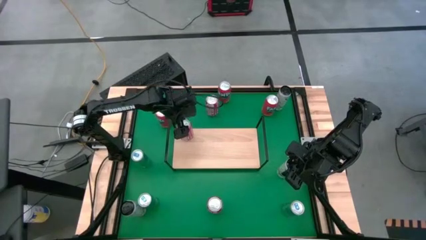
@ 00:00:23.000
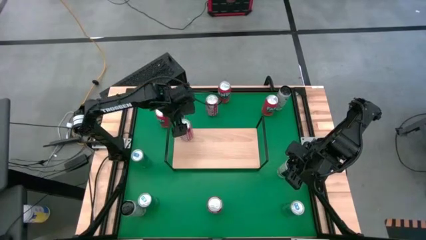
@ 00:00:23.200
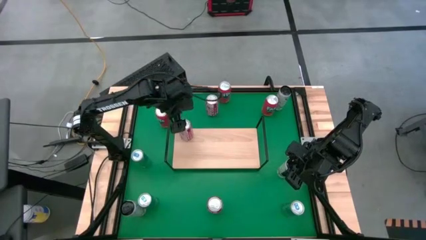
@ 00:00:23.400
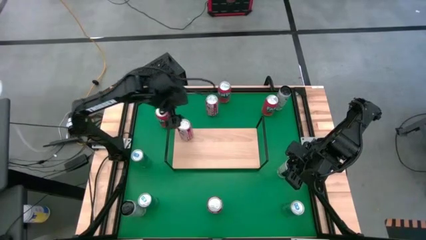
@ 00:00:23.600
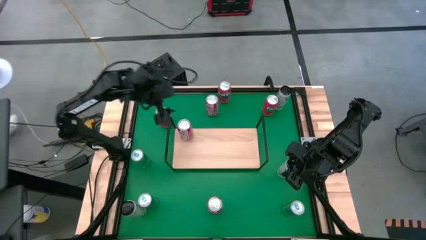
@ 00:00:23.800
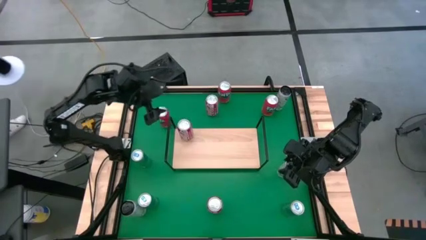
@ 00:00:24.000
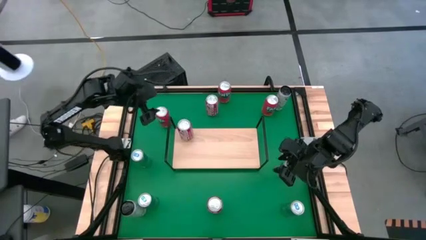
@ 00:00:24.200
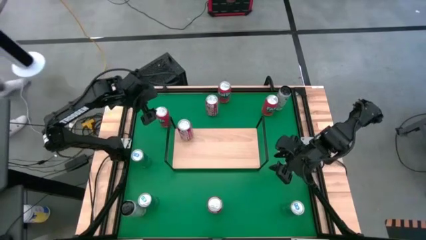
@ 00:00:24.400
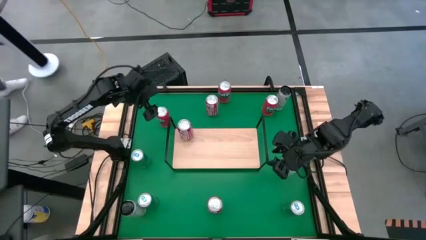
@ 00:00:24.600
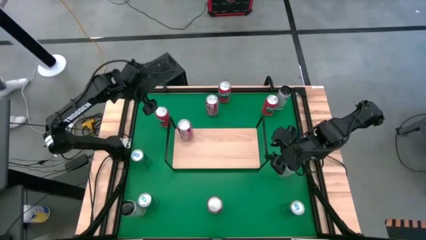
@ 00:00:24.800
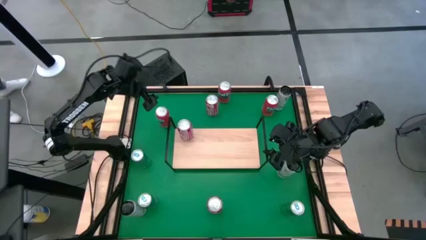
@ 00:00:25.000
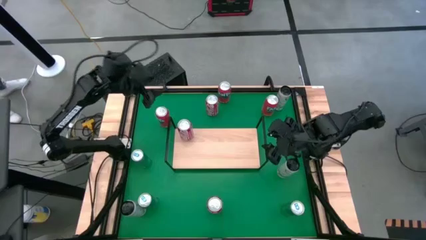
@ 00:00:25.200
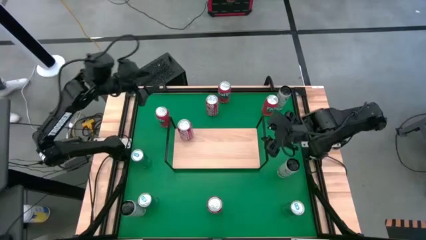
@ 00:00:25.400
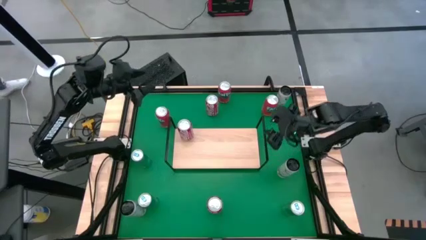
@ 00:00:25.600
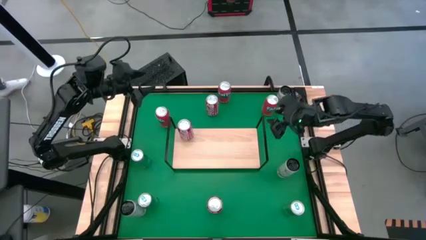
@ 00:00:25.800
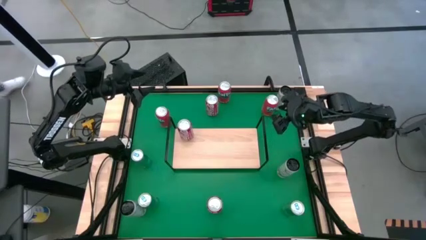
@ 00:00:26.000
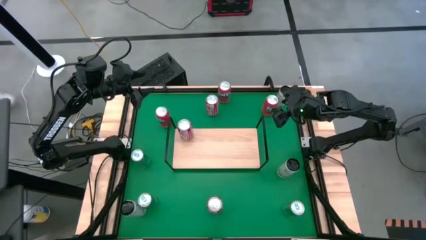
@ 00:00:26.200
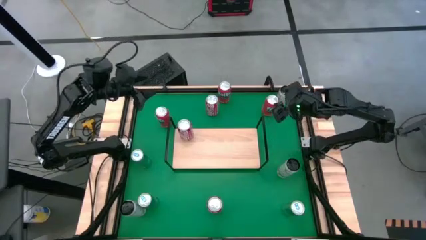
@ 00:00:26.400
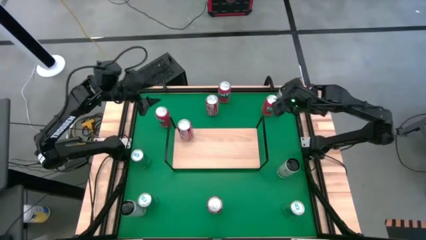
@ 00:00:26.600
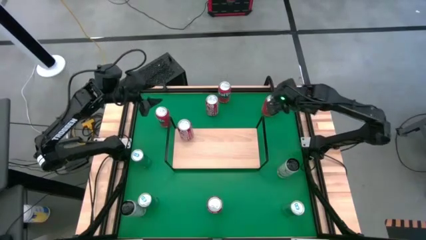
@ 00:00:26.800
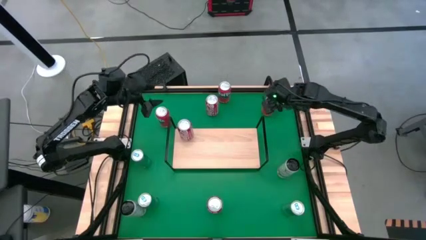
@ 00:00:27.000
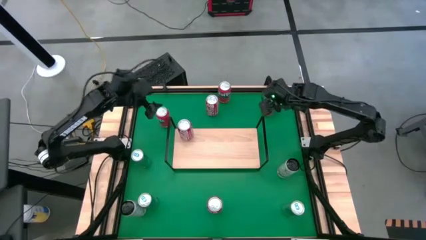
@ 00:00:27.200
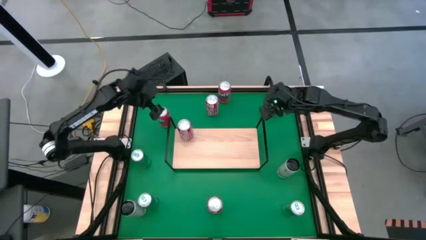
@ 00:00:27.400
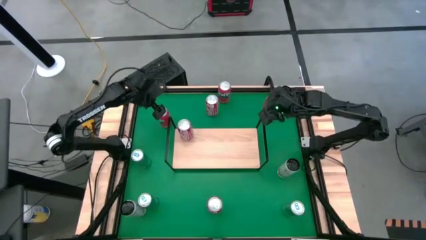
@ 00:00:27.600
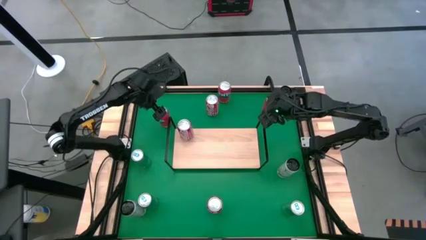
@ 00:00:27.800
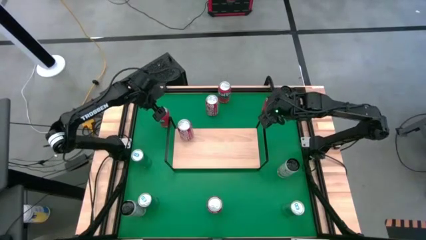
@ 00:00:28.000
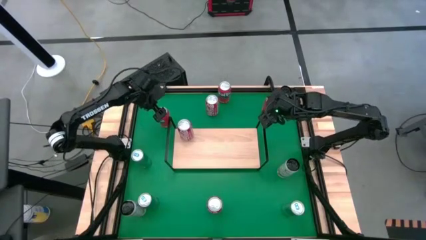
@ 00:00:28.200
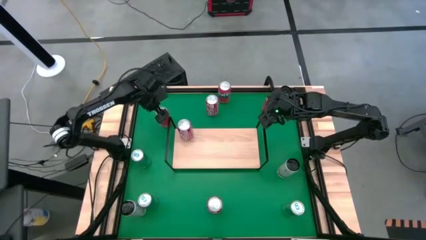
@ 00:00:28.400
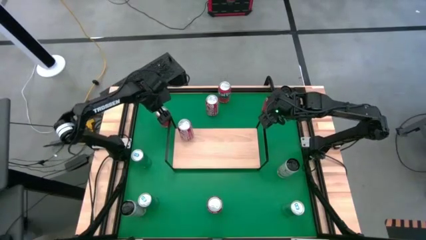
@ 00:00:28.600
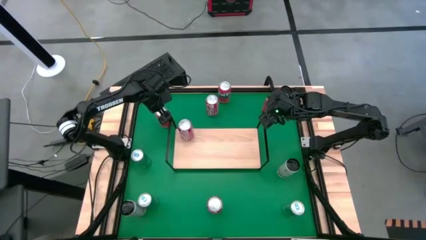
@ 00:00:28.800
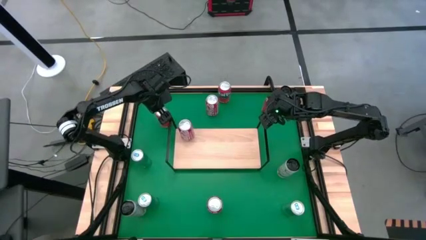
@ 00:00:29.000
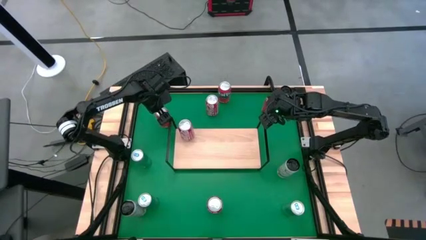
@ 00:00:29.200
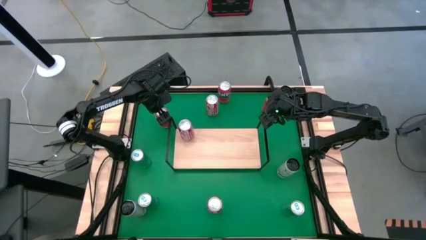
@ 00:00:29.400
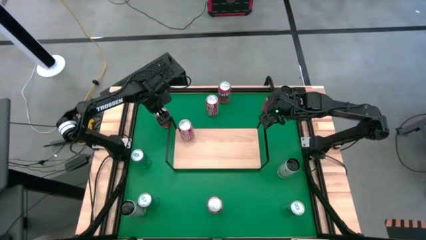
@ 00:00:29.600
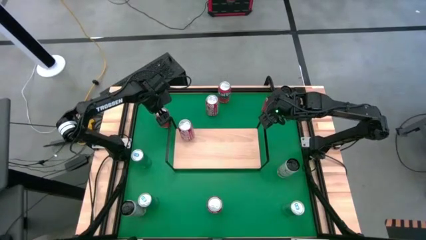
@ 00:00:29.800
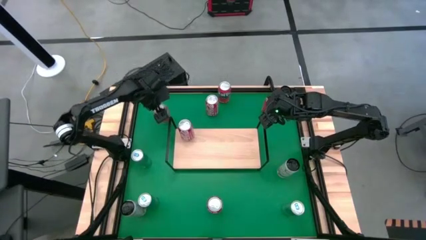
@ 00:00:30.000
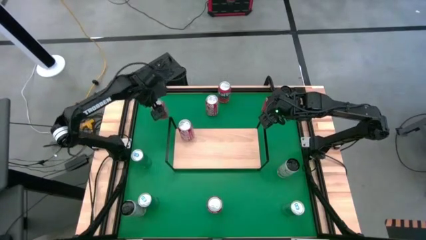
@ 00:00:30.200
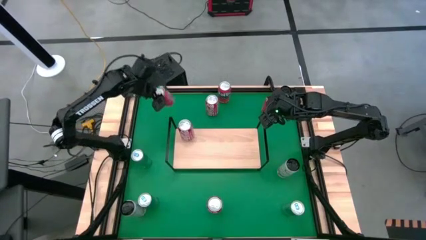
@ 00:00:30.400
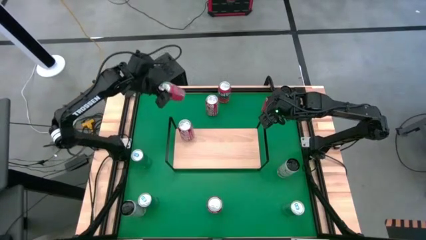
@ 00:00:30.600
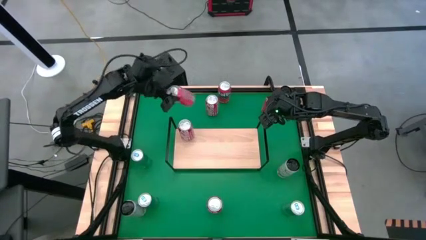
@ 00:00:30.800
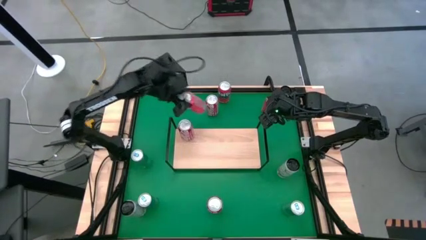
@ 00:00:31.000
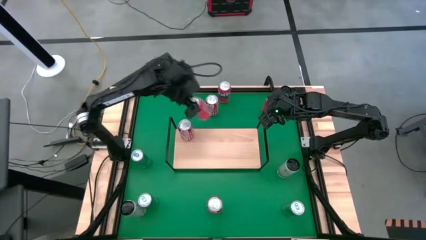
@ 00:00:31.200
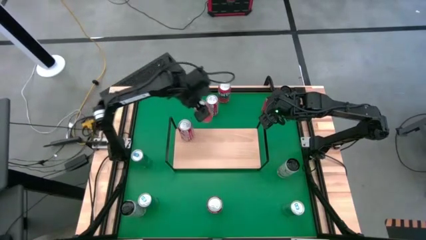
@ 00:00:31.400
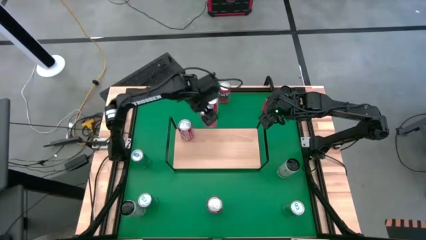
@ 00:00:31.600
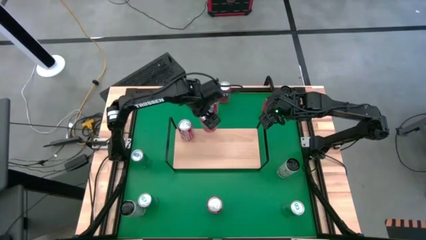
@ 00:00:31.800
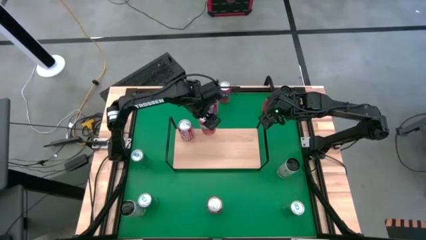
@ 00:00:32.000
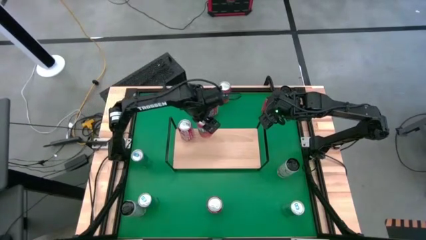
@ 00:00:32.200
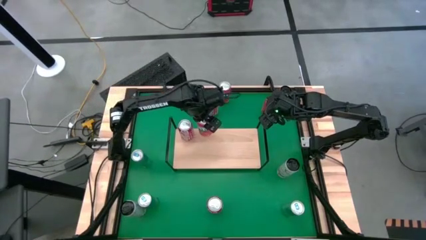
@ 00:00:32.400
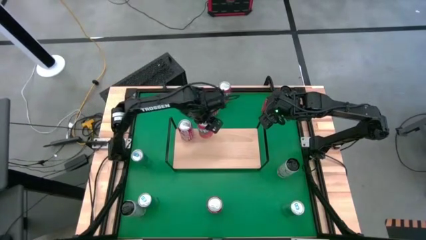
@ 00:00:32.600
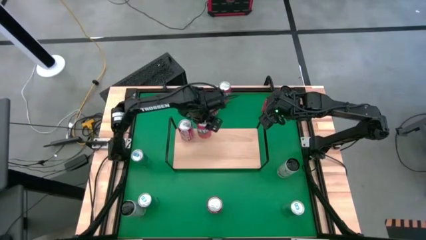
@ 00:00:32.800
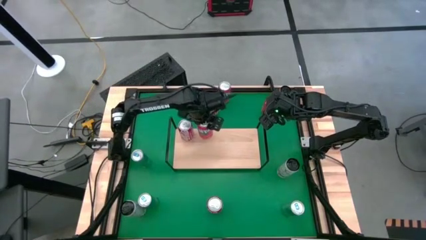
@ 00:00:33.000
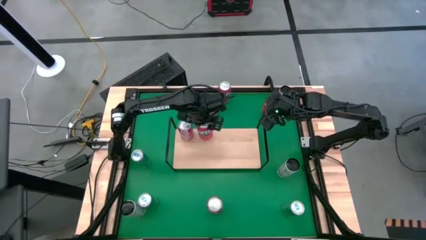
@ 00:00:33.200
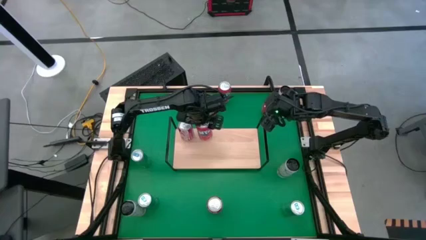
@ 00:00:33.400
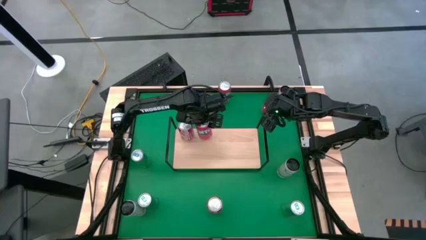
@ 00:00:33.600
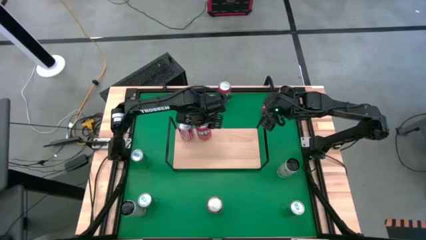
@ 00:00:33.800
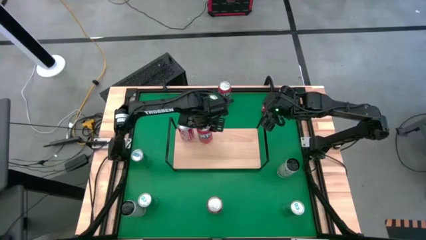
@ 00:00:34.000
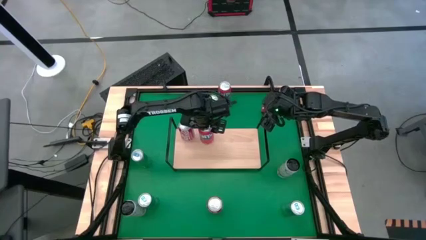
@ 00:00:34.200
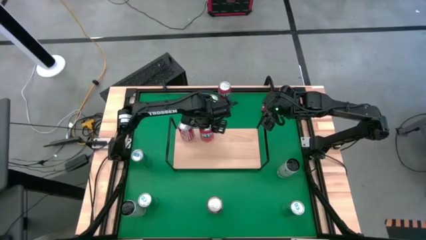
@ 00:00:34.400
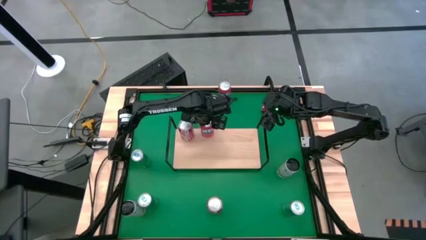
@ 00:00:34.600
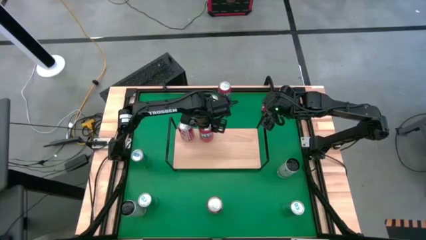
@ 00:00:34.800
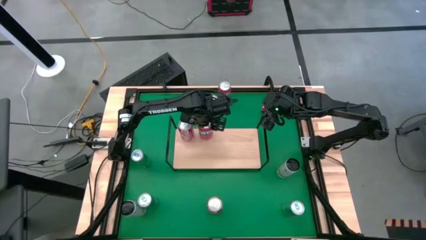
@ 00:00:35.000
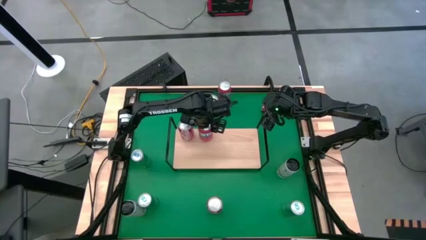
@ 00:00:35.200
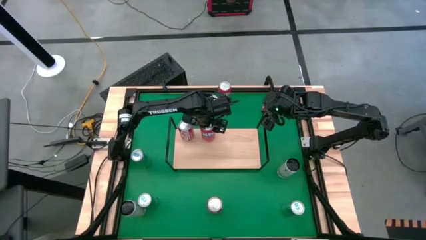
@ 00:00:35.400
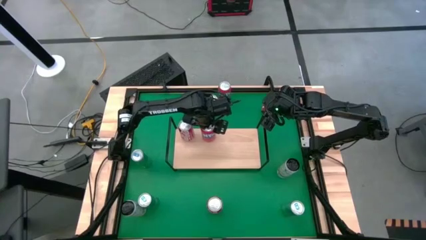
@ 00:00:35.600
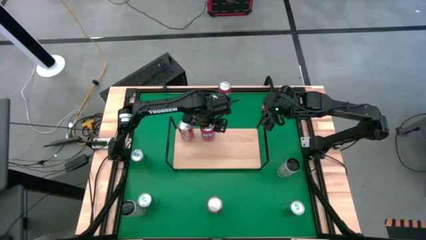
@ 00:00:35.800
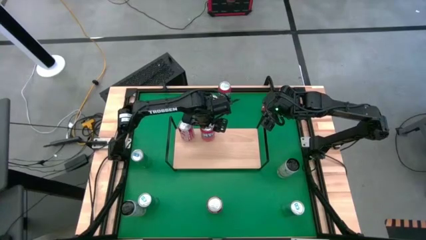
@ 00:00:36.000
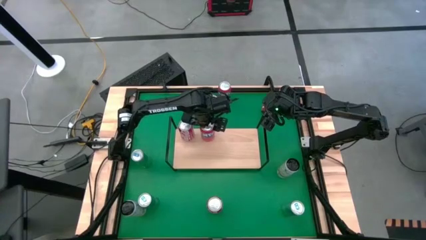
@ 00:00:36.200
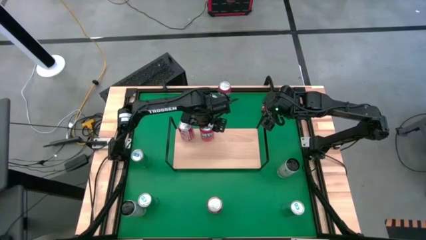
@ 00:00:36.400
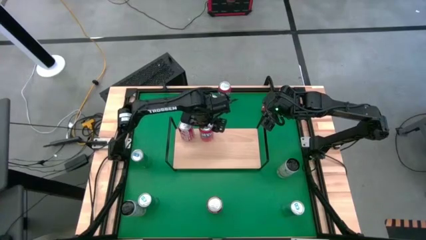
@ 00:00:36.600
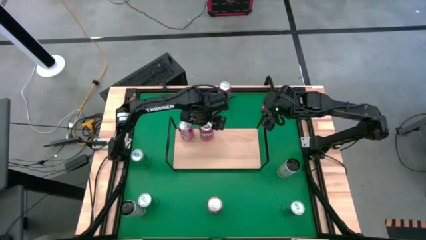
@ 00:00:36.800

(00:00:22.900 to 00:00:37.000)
Task: Place canned beverage on shelf
Put the bottom left orange soda can on the shelf
